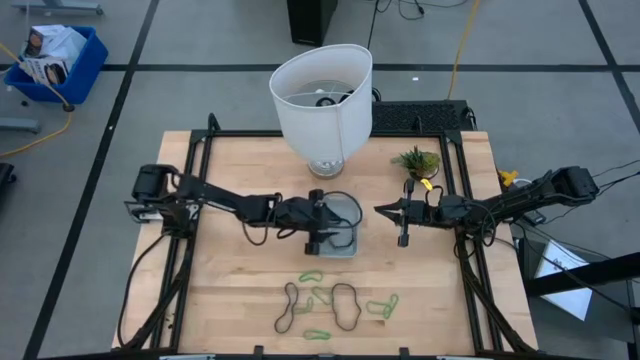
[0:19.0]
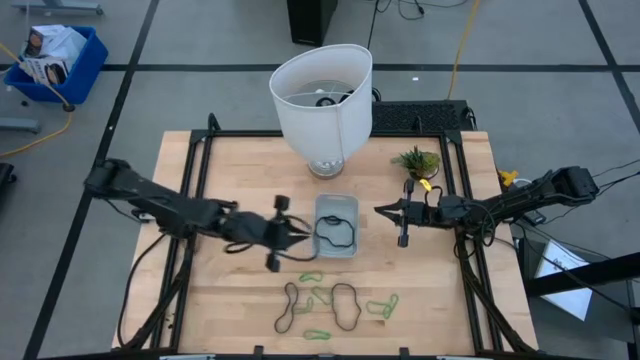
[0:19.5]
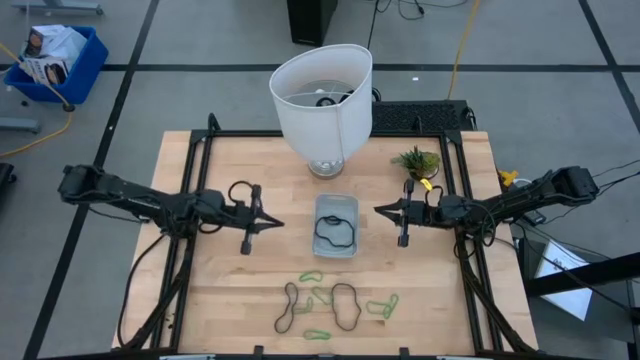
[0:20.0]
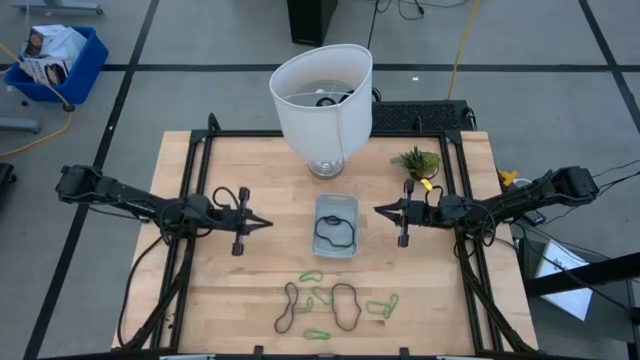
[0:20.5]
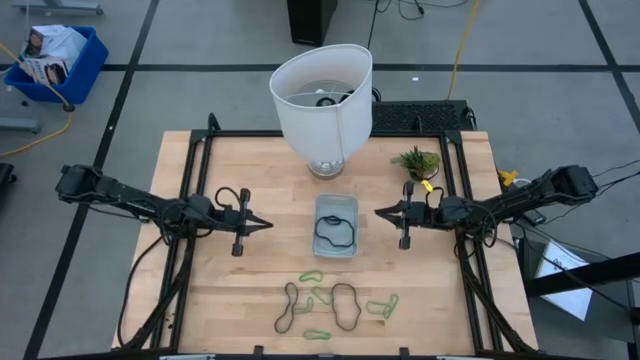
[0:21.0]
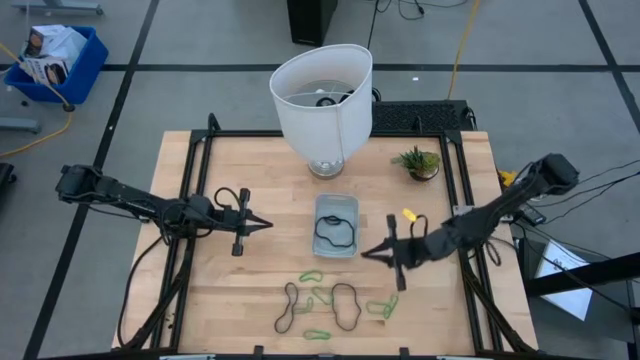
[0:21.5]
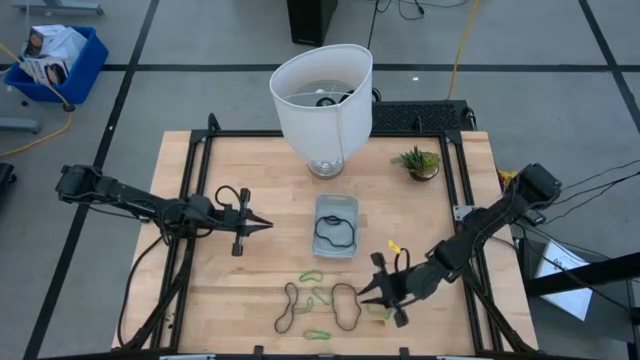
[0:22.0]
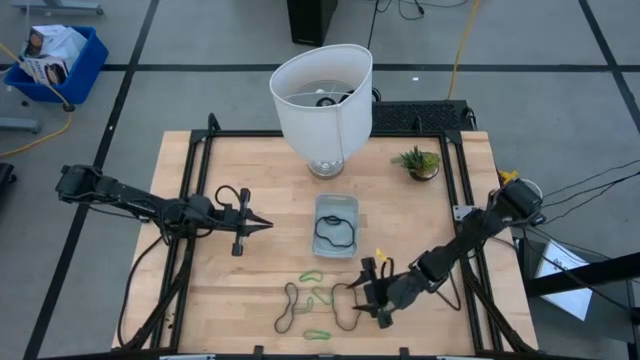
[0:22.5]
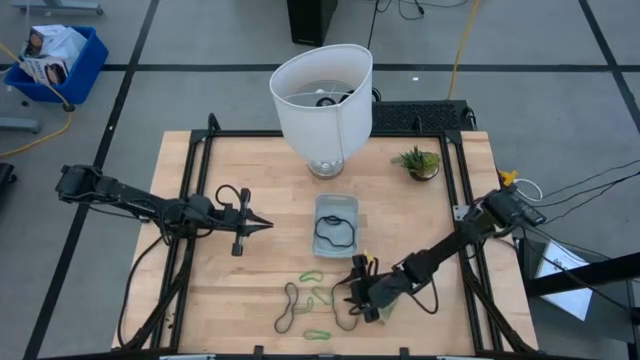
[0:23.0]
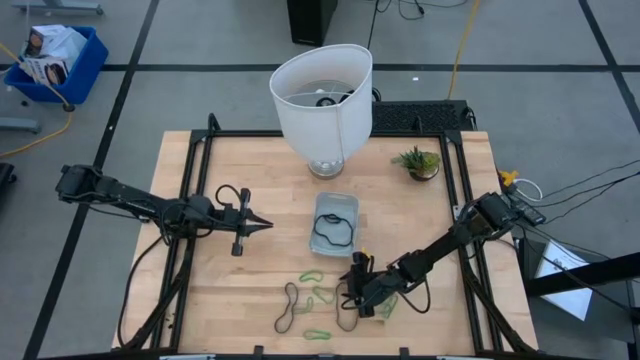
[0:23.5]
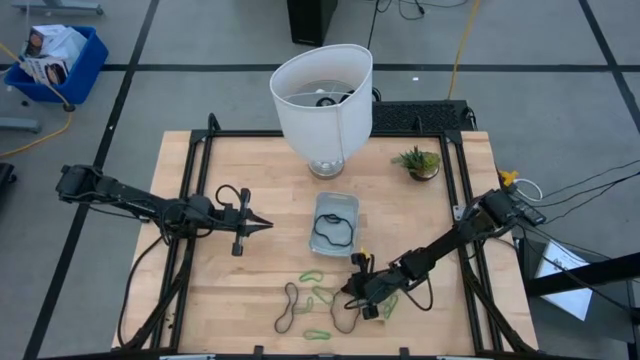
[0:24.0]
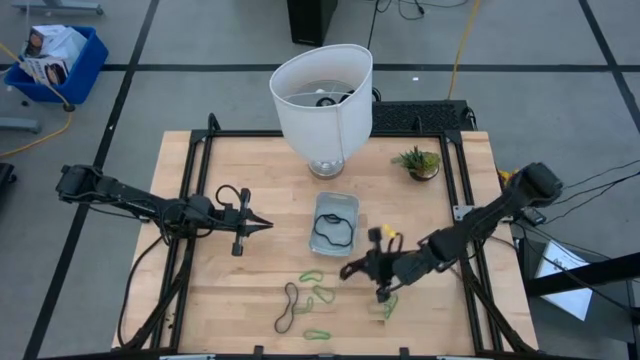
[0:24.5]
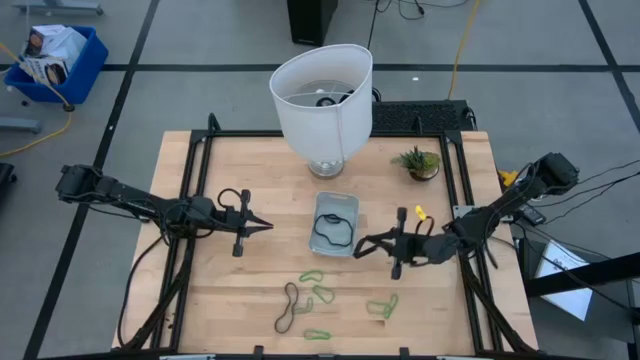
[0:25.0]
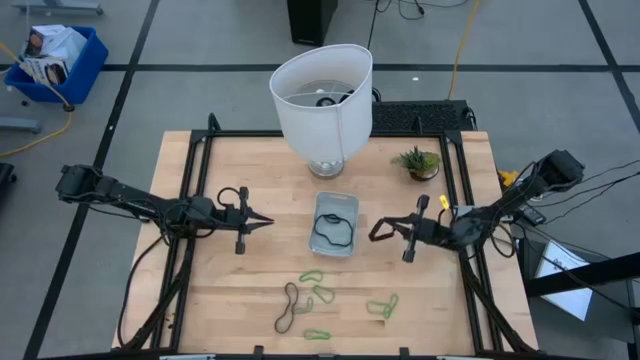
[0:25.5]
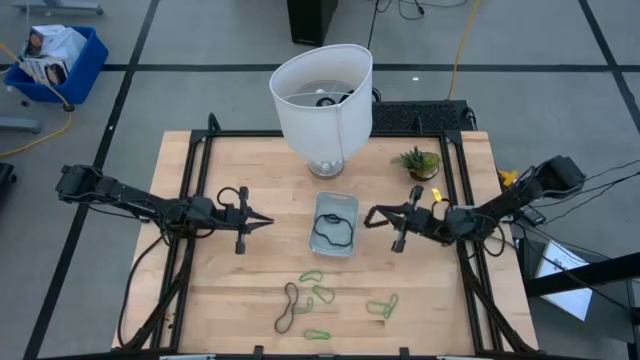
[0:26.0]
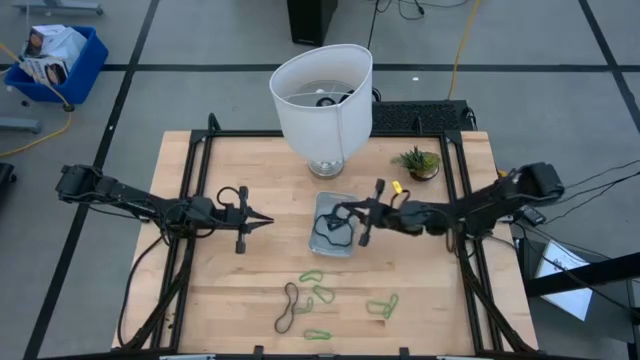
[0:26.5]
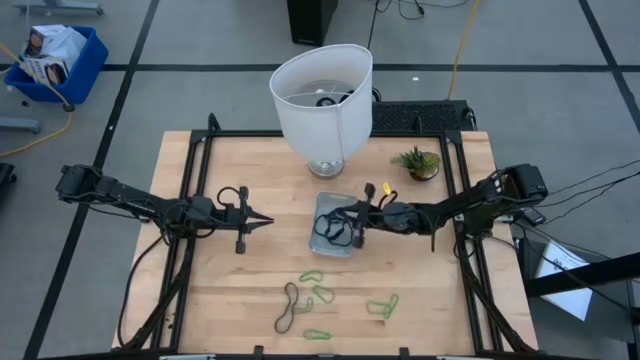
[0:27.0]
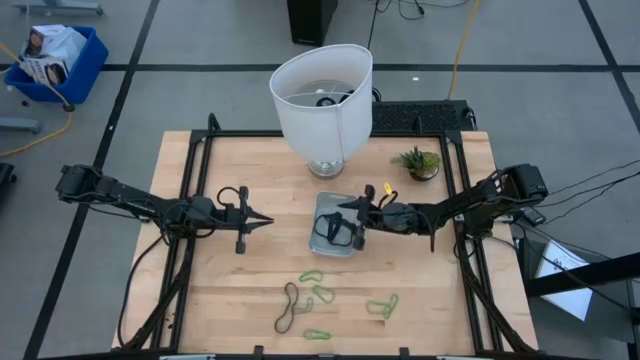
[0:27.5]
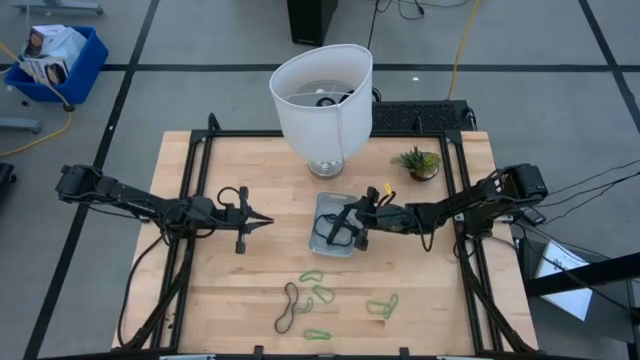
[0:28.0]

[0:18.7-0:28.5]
Task: Pick and place rubber bands into bin
Put the black rubber band into the gray bin

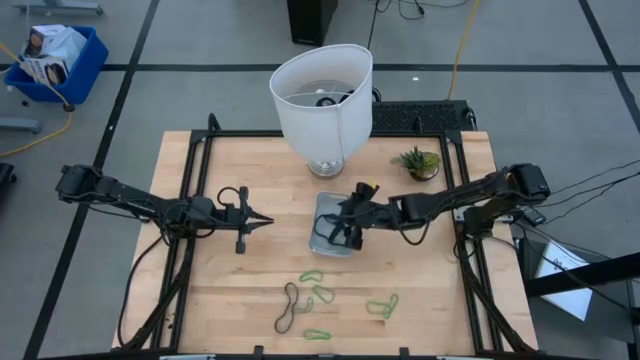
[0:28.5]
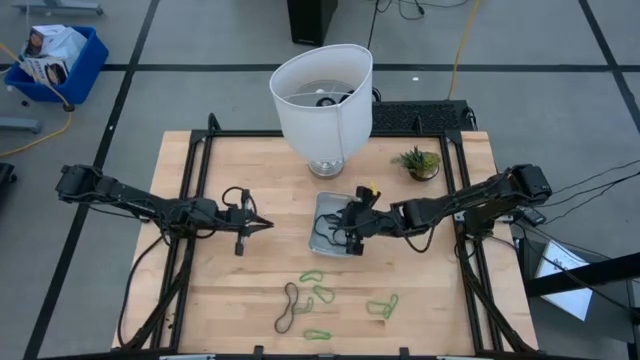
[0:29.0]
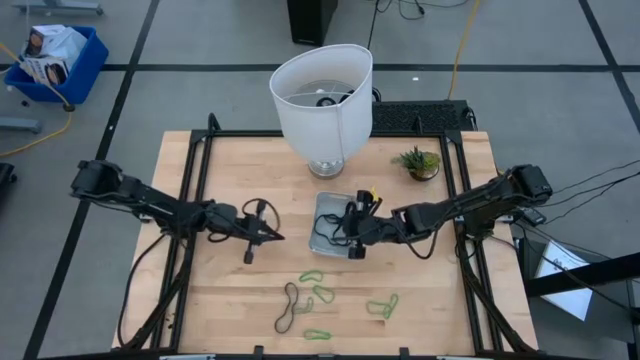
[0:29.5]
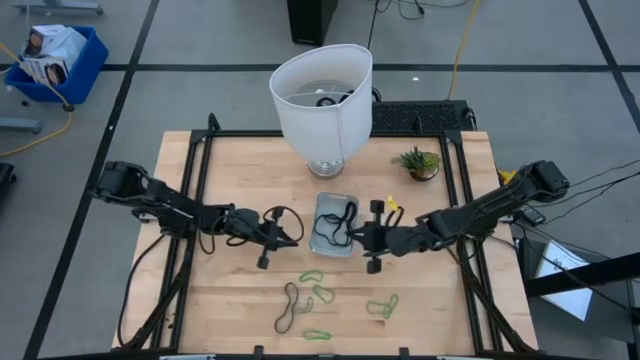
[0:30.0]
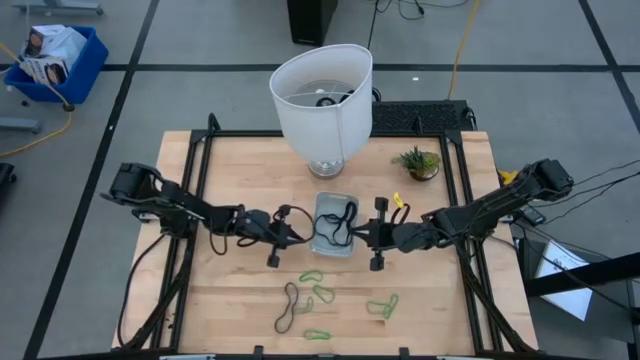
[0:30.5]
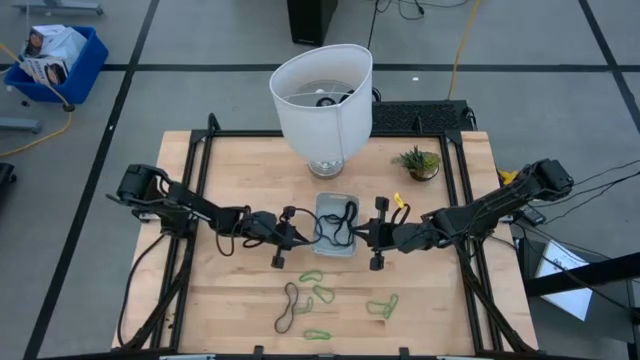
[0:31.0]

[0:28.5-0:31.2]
Adjust the gray bin

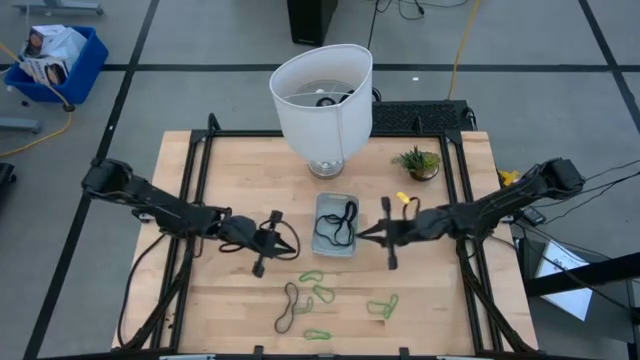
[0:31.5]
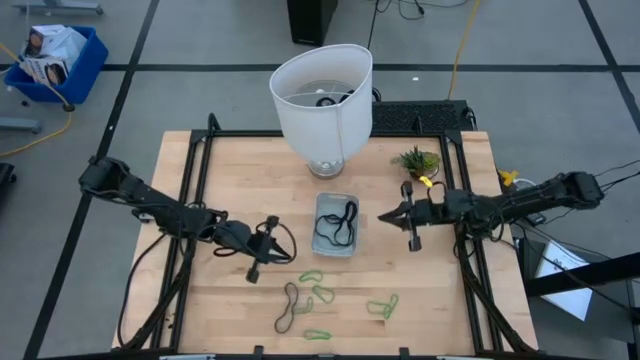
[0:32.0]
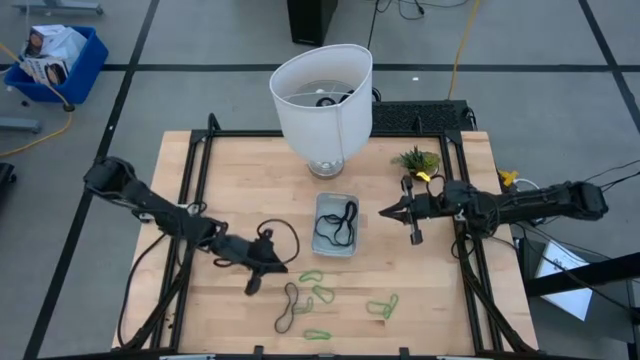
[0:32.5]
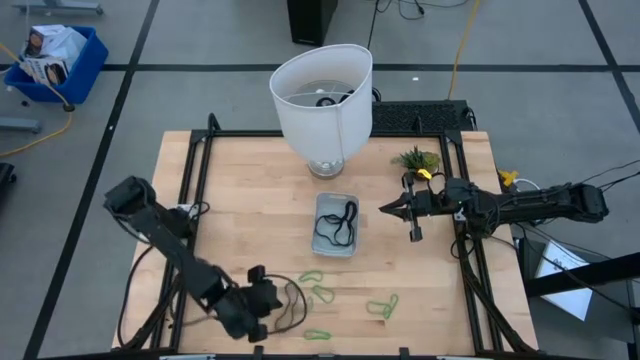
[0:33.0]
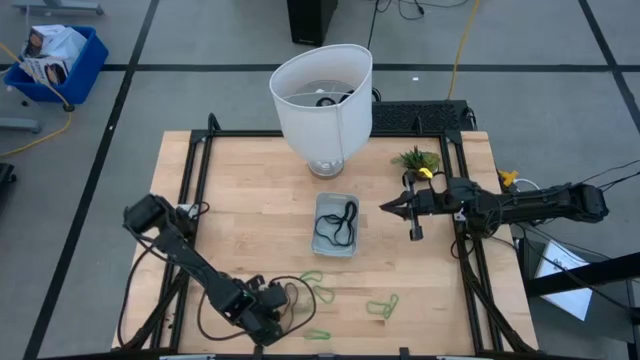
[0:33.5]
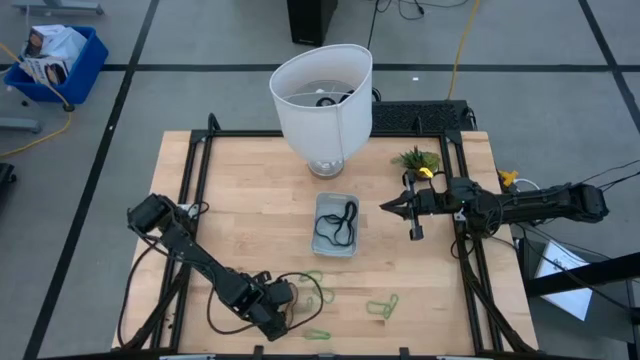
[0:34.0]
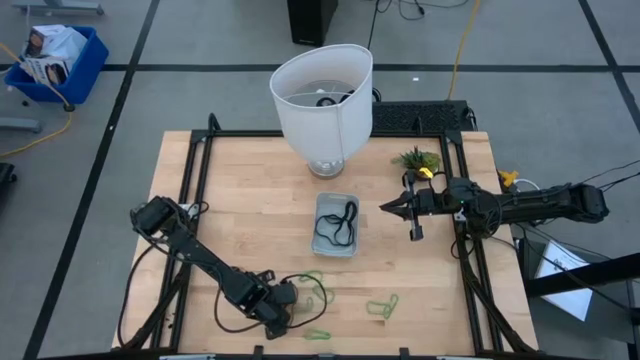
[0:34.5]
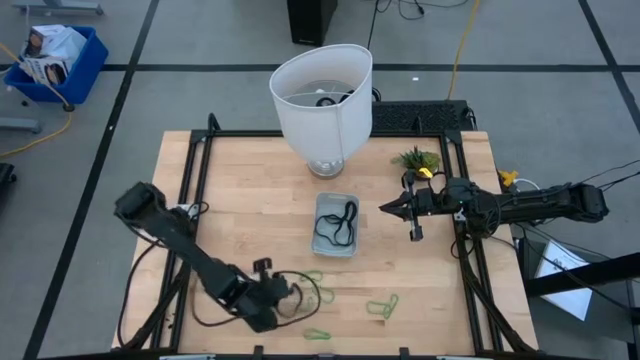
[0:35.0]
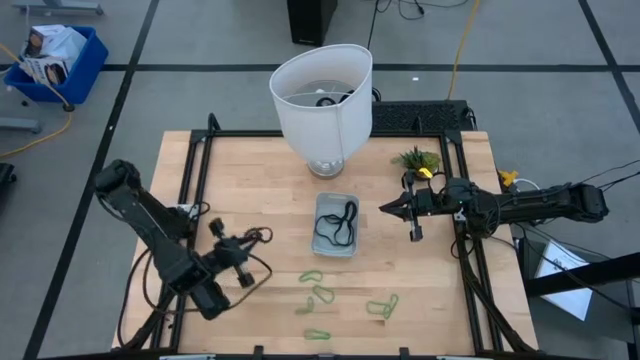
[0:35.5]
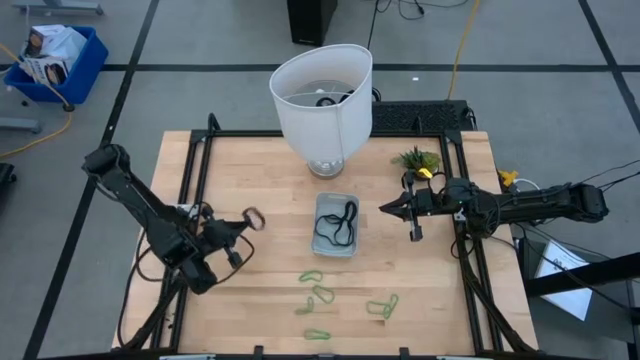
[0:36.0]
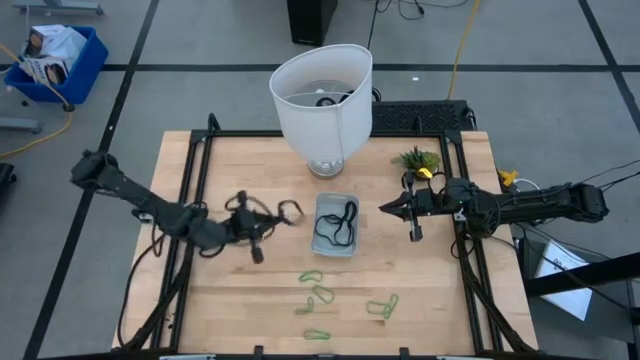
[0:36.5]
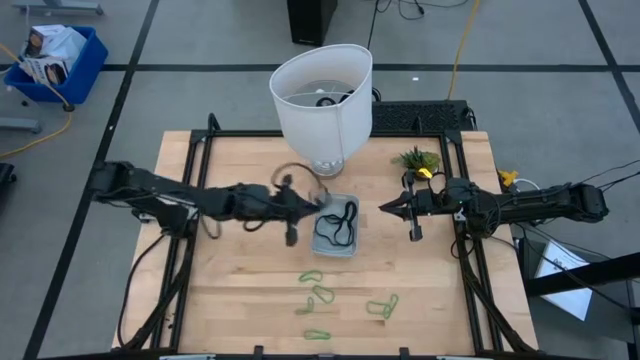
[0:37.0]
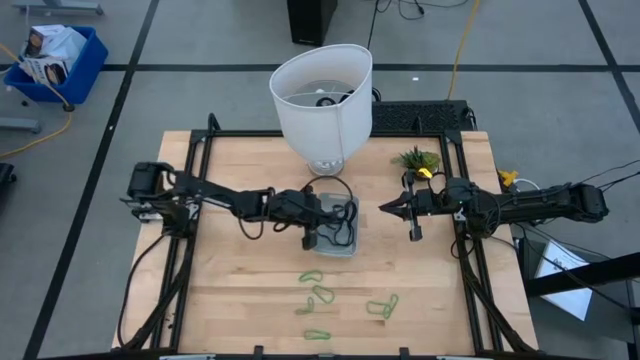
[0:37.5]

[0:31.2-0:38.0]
Put the black rubber band into the gray bin

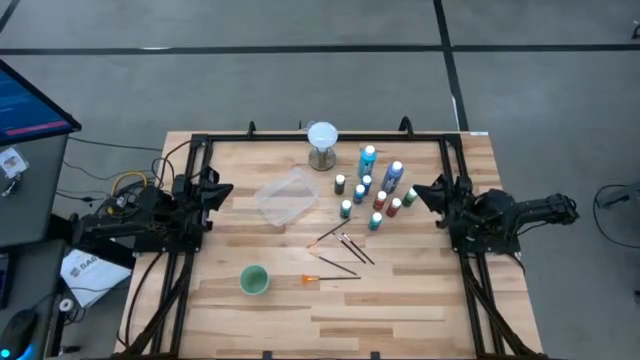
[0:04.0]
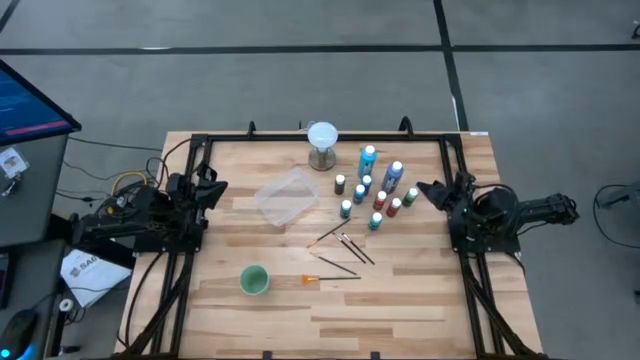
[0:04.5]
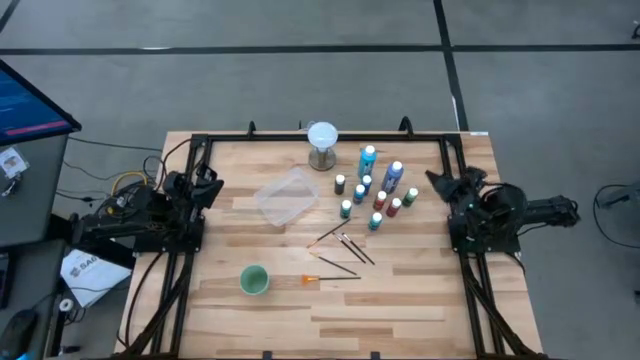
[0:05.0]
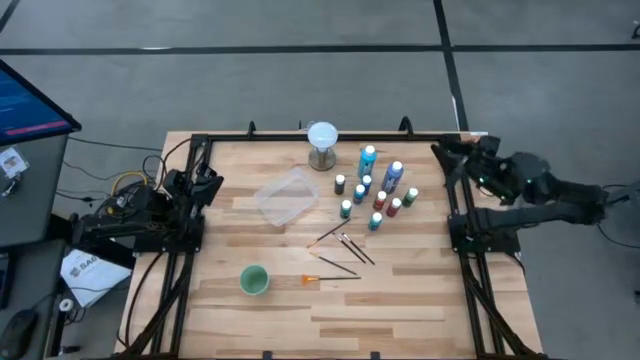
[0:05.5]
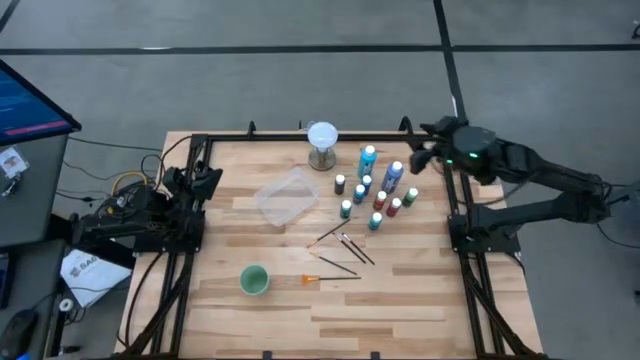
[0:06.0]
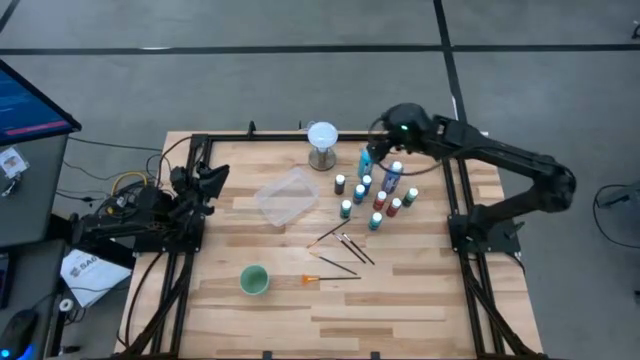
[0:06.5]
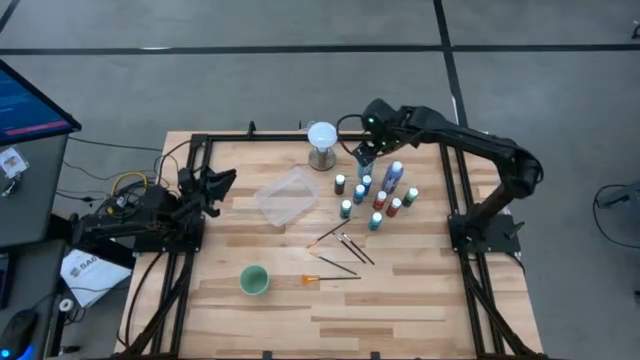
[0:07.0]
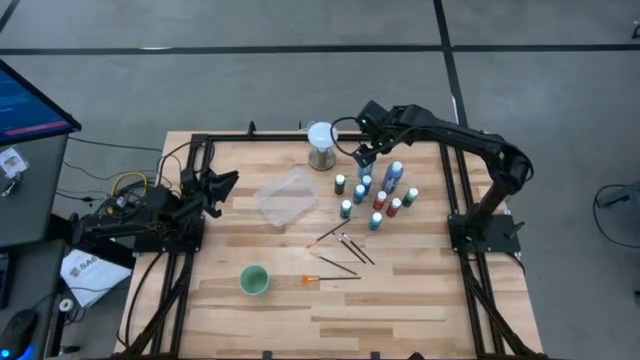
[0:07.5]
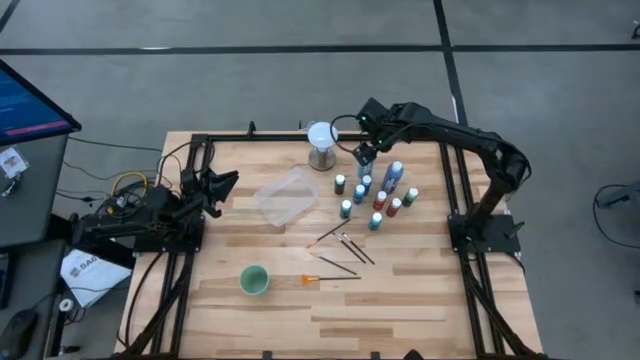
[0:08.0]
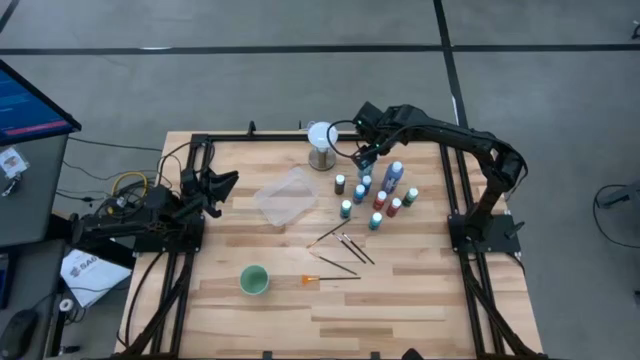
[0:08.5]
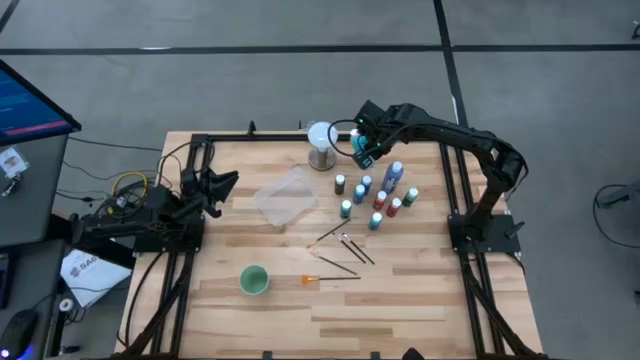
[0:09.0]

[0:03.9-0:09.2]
Task: Pick & Place Paint Supplies
Put the big light blue bottle into the white bin
